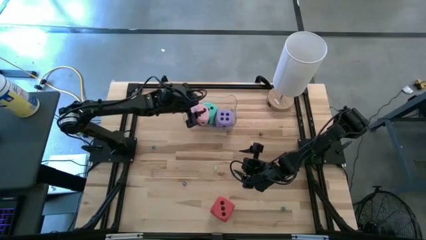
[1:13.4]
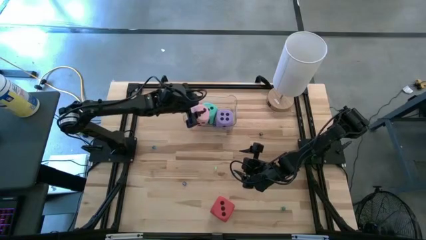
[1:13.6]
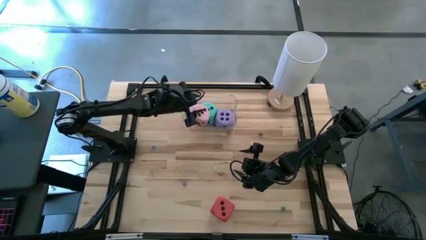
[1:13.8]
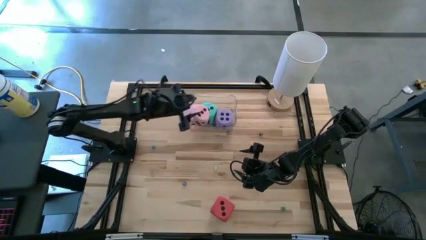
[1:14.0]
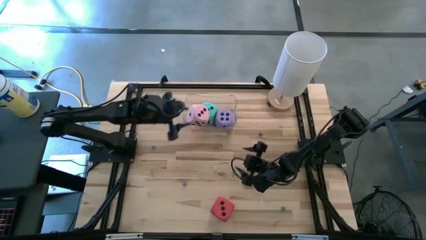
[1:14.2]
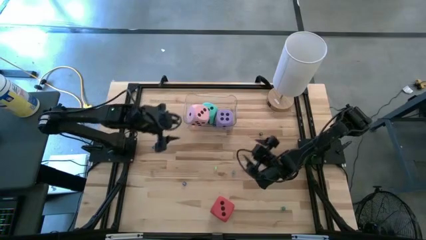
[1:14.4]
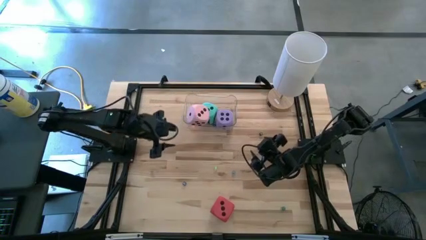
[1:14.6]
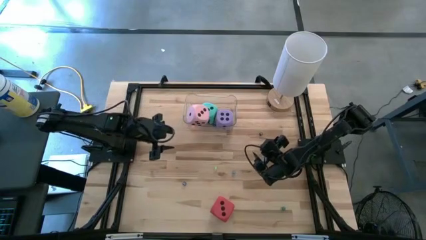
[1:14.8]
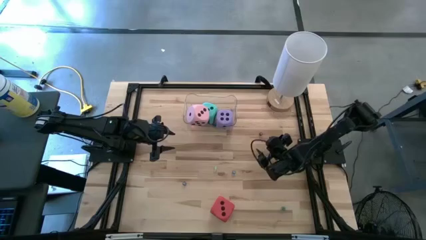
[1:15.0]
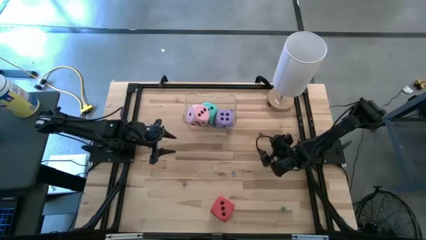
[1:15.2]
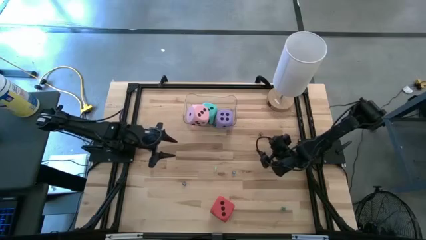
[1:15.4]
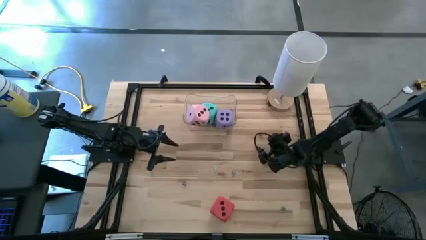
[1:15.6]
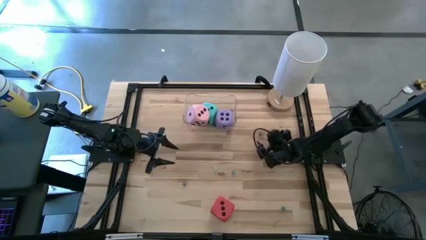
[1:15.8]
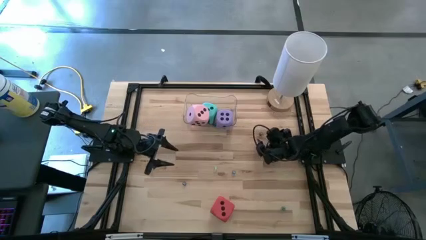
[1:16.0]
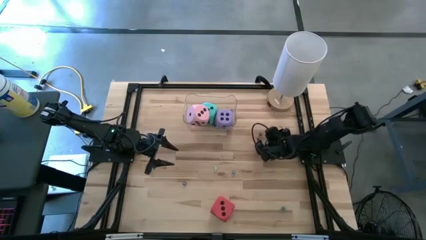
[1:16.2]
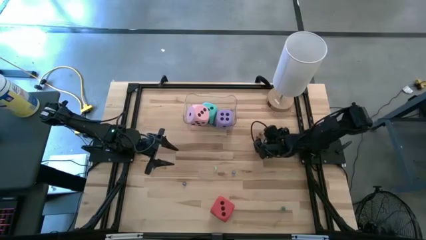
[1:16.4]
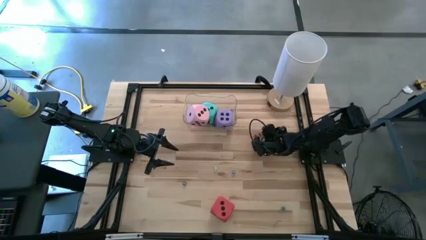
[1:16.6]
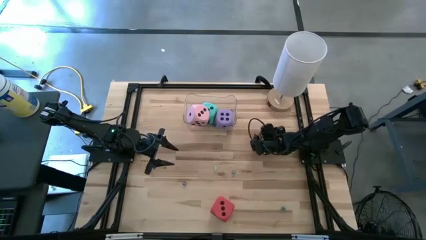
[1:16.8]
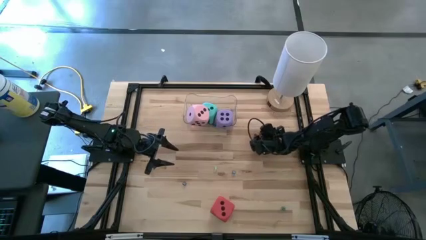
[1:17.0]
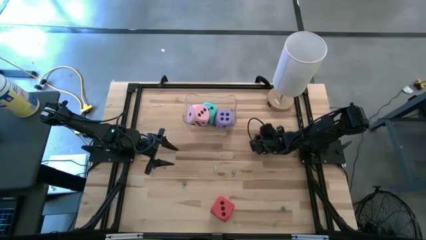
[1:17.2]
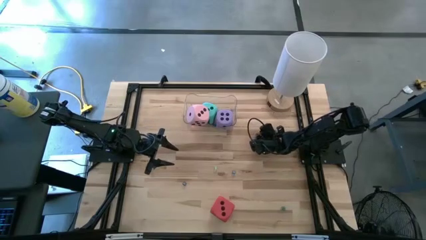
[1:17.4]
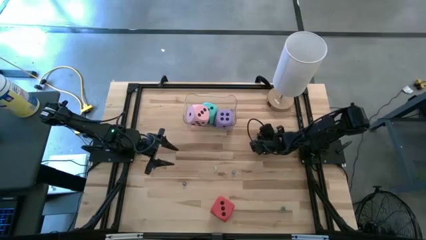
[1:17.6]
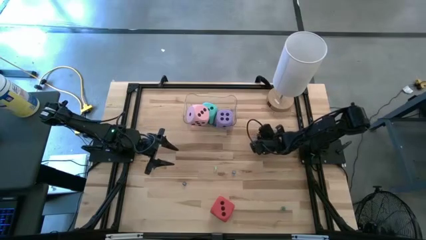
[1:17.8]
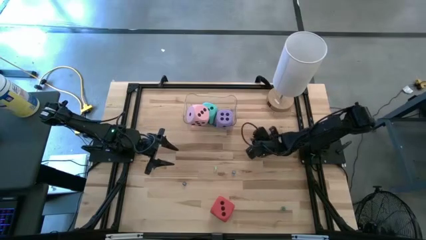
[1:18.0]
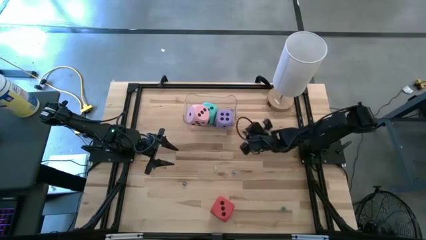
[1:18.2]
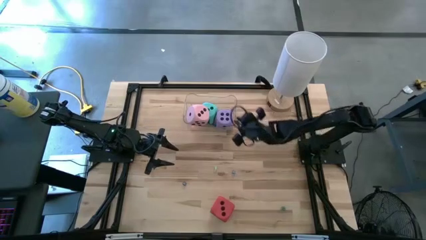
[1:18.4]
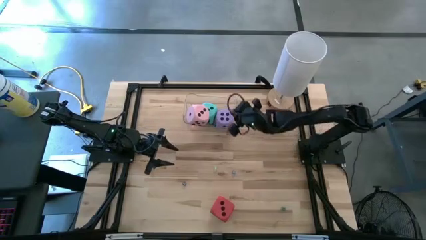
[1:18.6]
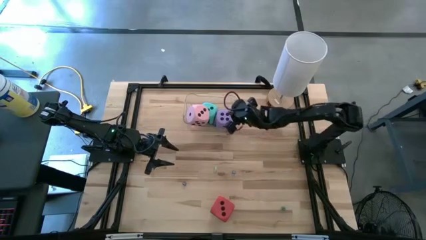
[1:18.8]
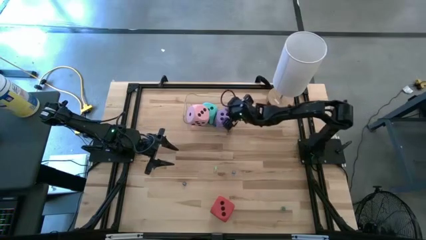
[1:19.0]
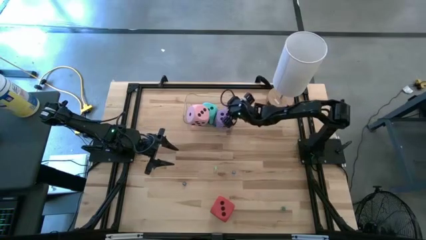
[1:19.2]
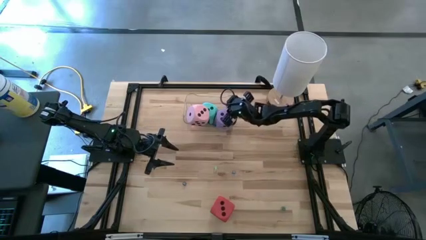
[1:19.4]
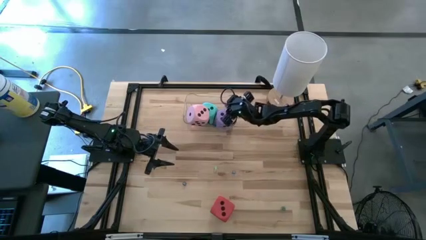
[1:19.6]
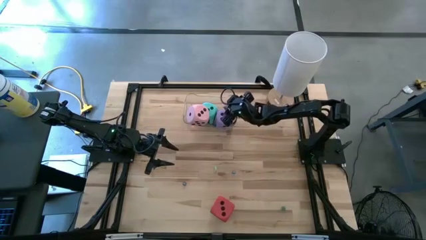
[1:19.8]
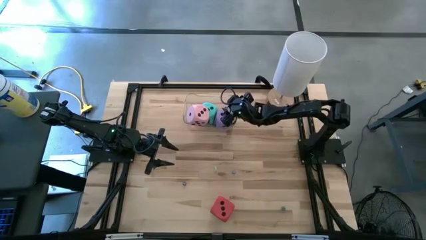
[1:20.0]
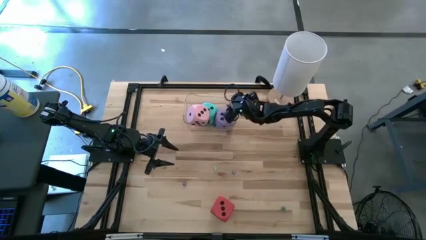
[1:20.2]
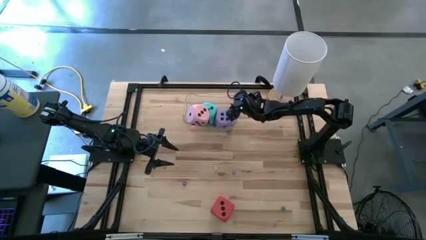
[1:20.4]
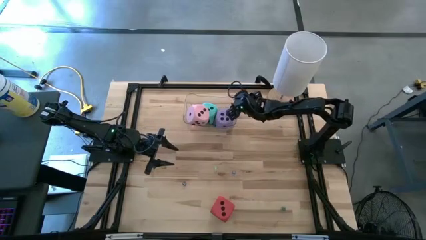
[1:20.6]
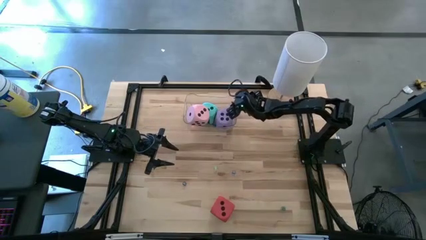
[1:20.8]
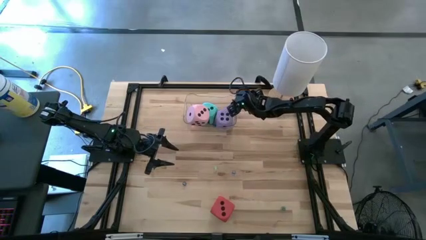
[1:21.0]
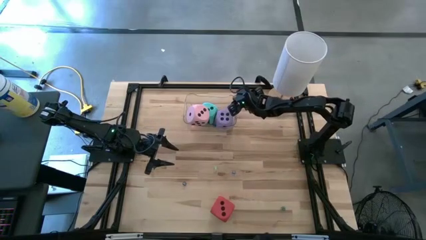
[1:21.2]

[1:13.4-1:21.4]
Task: Pick & Place Dice
Put the black dice into the transparent bin

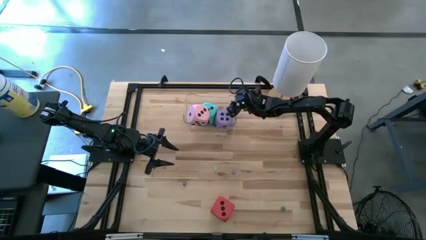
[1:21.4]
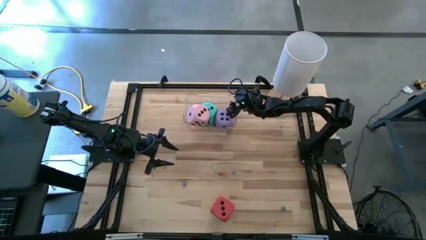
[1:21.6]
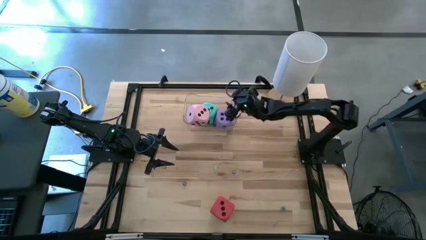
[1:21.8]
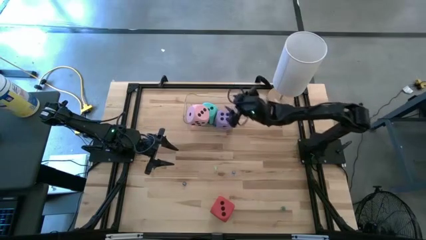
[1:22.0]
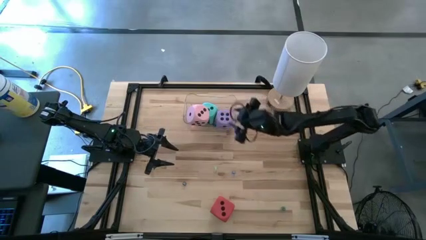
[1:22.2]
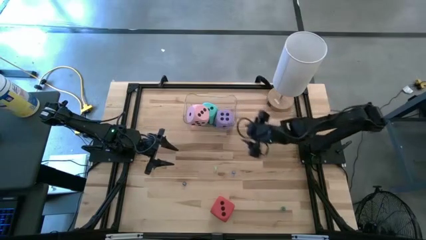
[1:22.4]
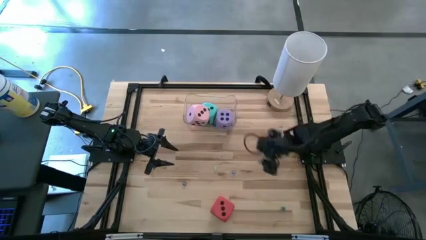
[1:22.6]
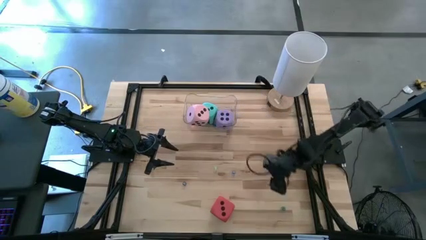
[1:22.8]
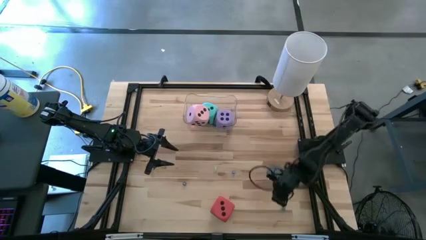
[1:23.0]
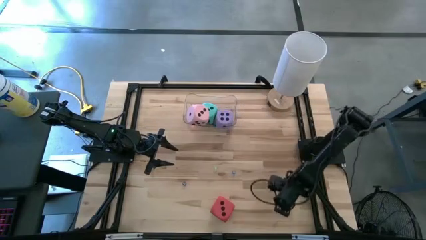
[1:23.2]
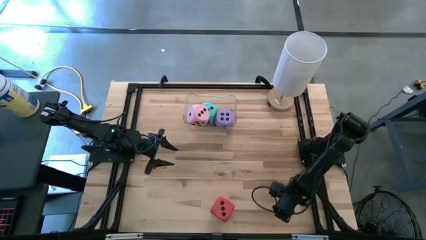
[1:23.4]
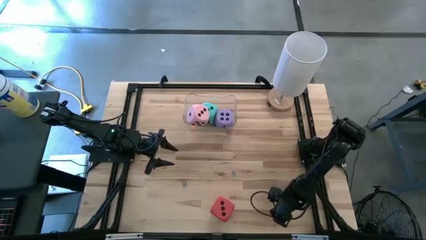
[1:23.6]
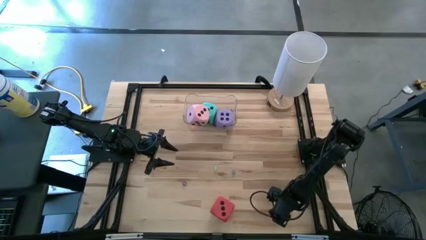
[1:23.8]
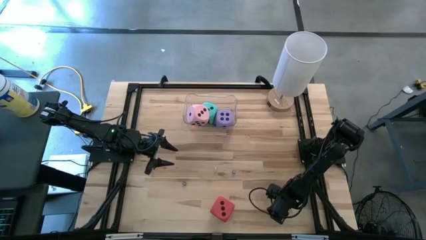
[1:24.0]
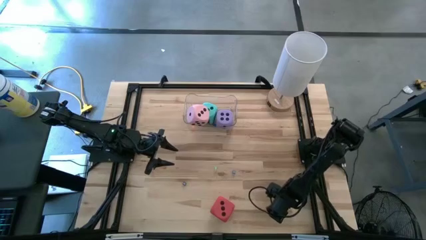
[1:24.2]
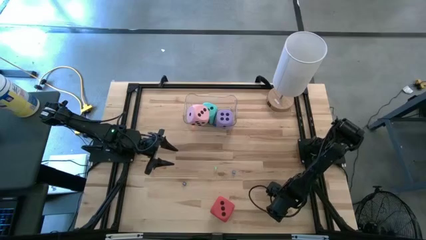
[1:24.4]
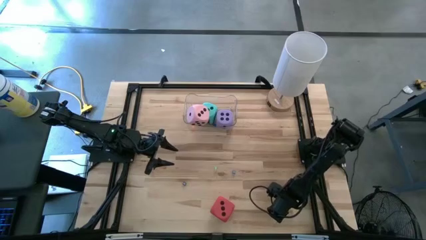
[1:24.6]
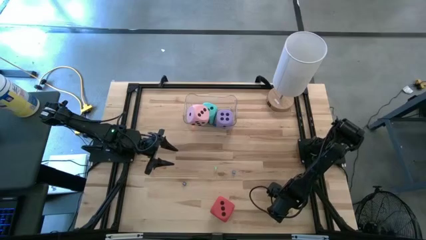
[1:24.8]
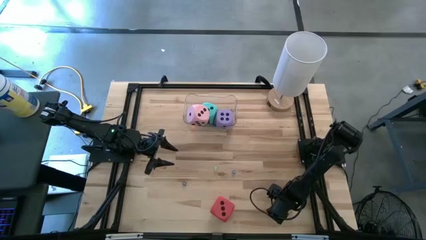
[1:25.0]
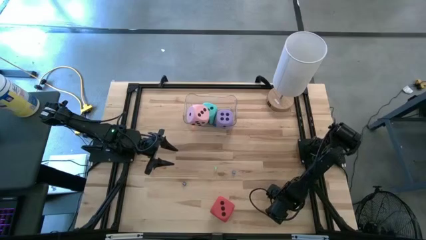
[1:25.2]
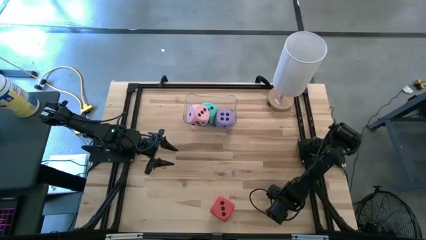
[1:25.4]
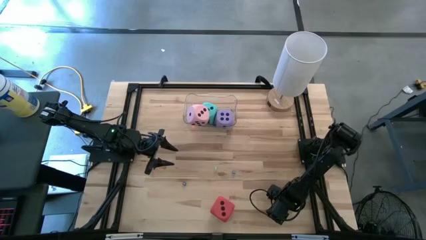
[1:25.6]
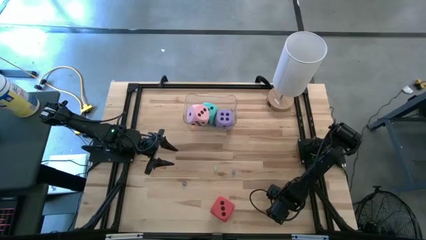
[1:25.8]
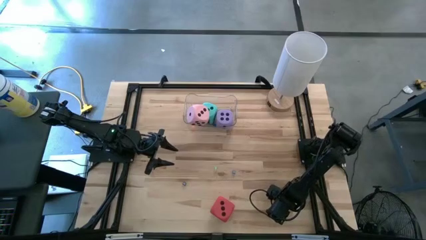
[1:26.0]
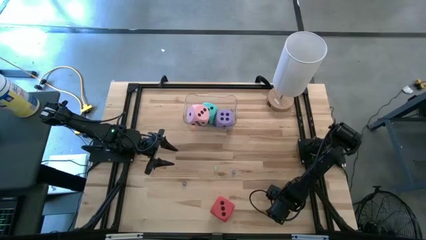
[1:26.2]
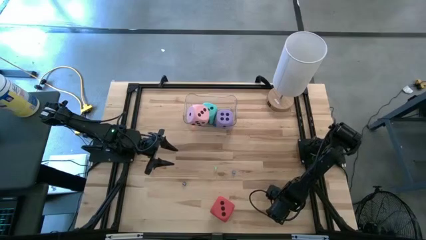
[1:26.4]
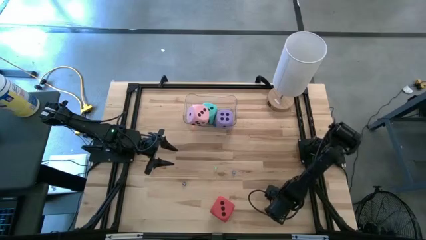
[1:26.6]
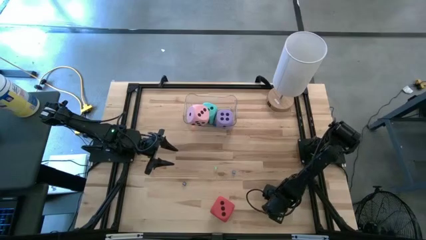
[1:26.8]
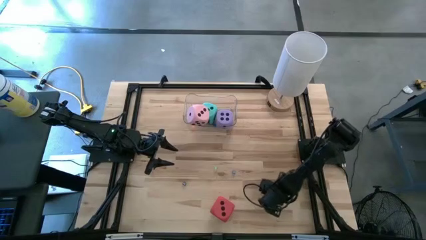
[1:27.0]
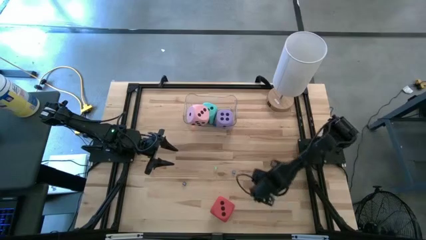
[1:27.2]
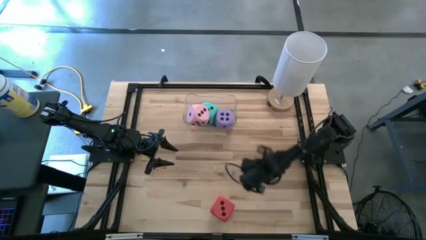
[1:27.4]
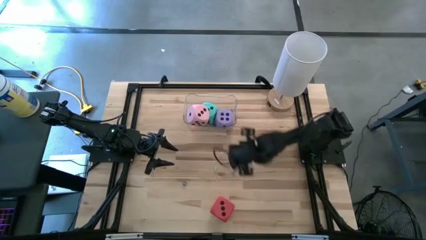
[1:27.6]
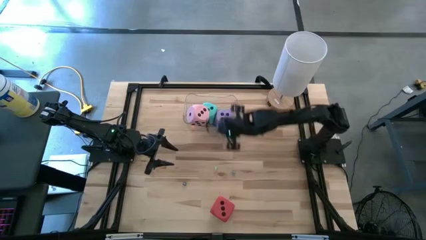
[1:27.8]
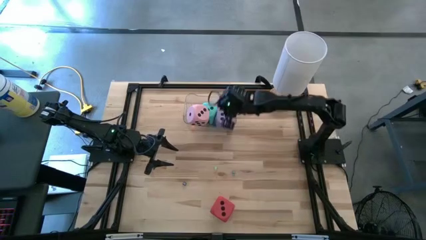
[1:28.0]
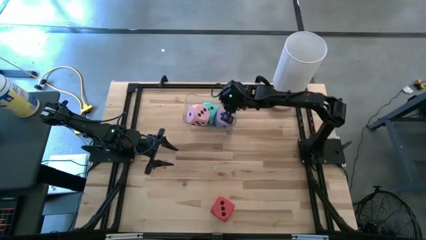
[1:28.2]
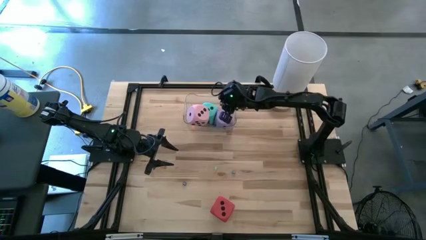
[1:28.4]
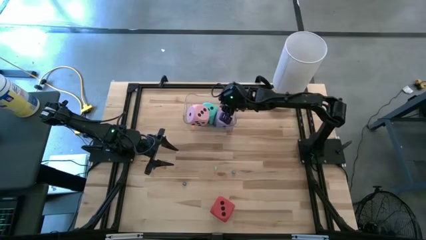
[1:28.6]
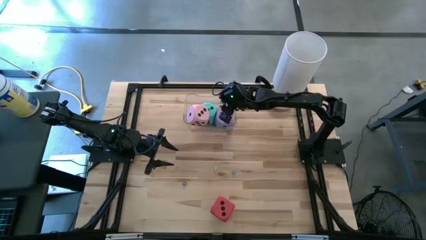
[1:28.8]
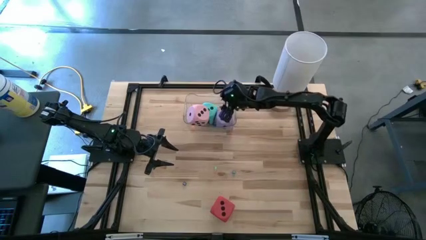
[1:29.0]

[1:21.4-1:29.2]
Put the green dice into the transparent bin
